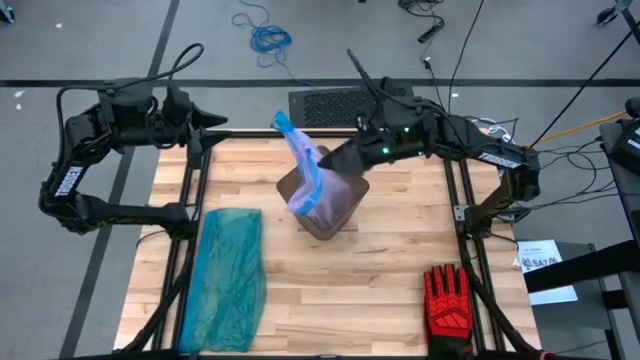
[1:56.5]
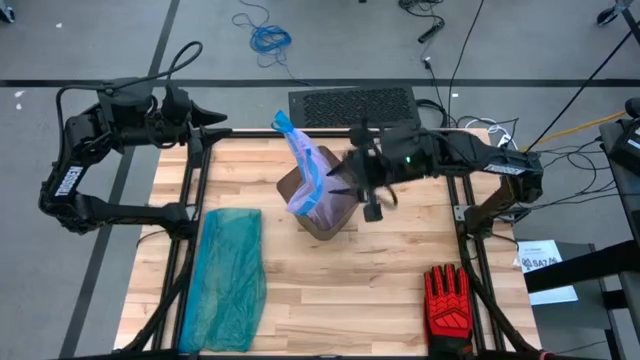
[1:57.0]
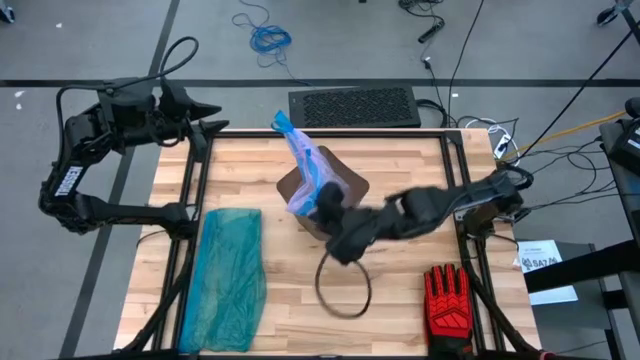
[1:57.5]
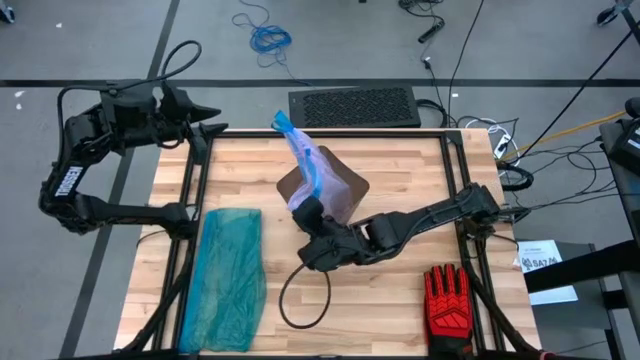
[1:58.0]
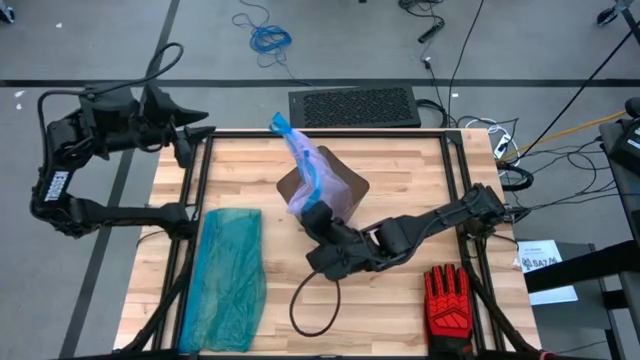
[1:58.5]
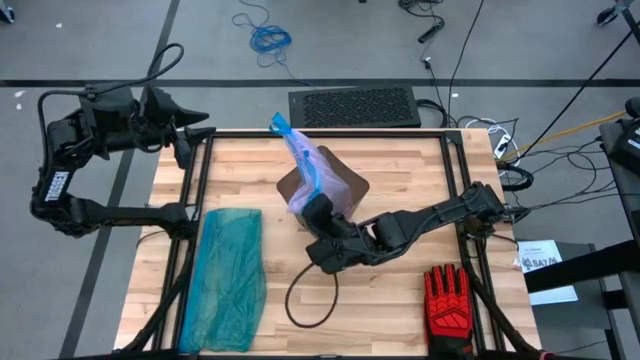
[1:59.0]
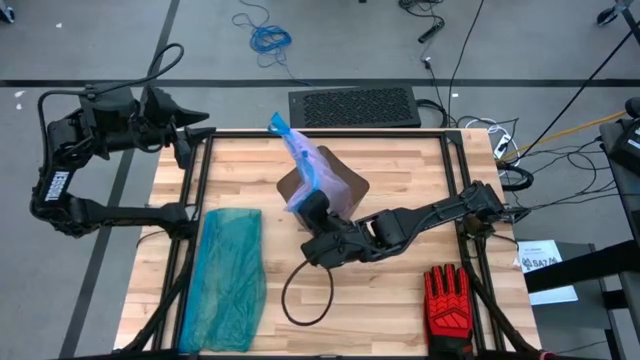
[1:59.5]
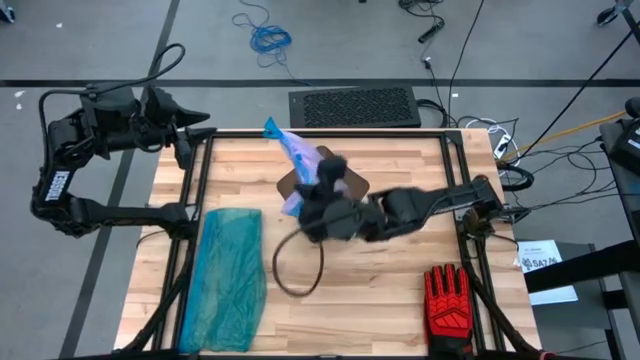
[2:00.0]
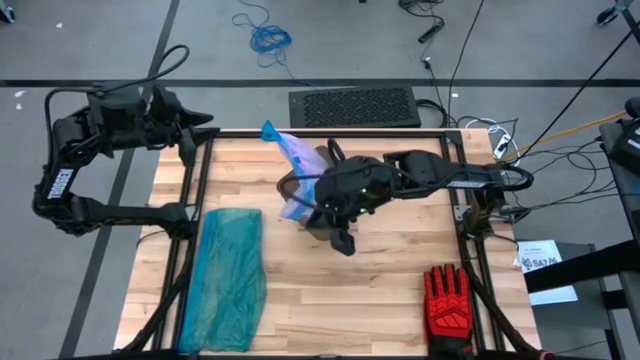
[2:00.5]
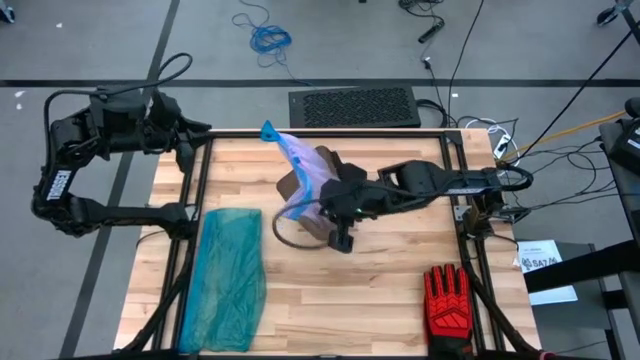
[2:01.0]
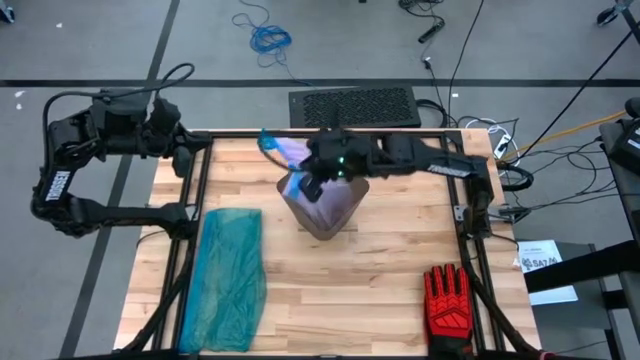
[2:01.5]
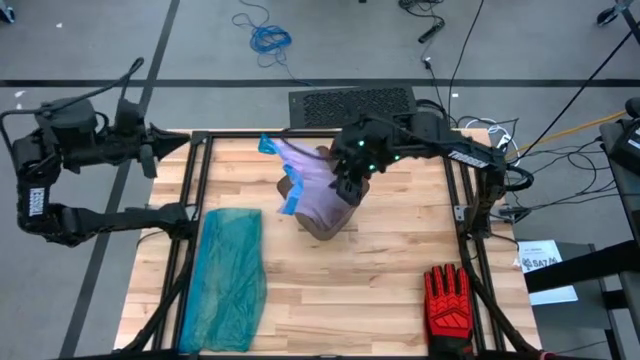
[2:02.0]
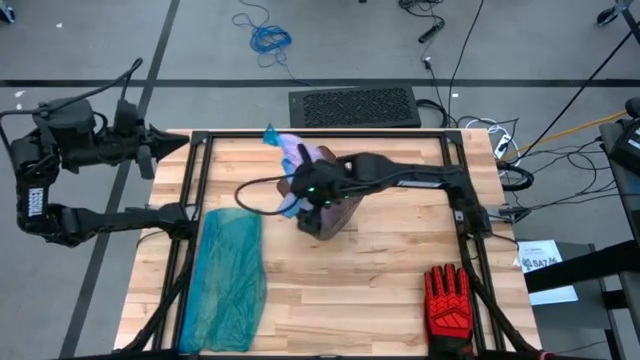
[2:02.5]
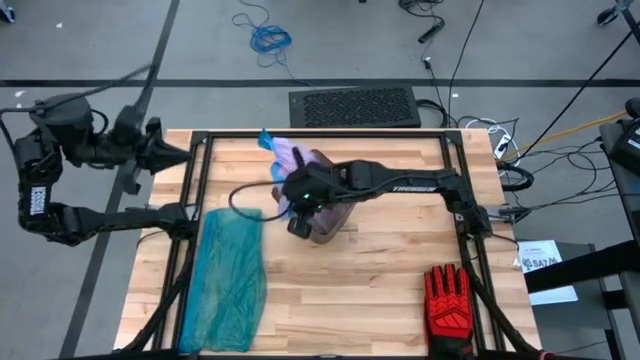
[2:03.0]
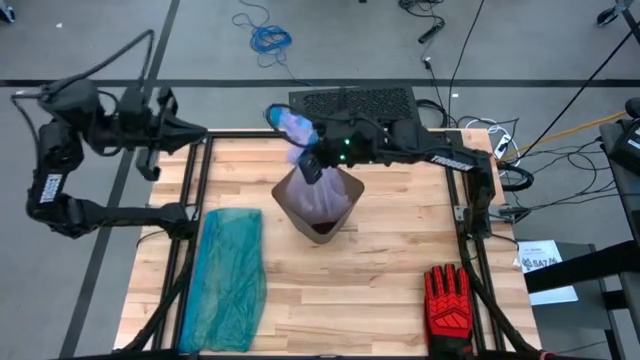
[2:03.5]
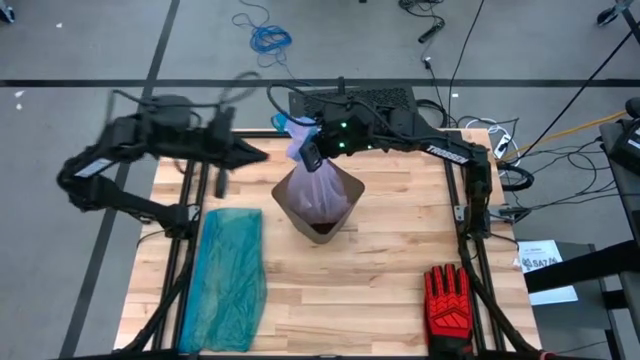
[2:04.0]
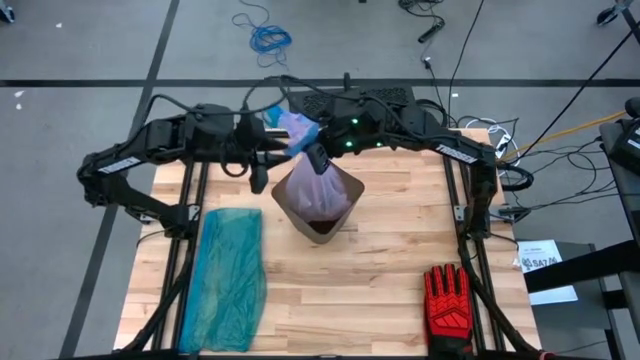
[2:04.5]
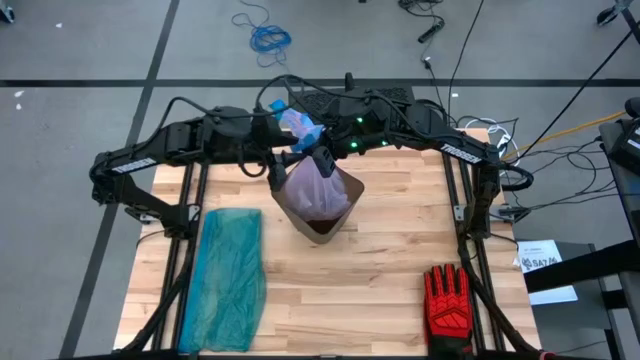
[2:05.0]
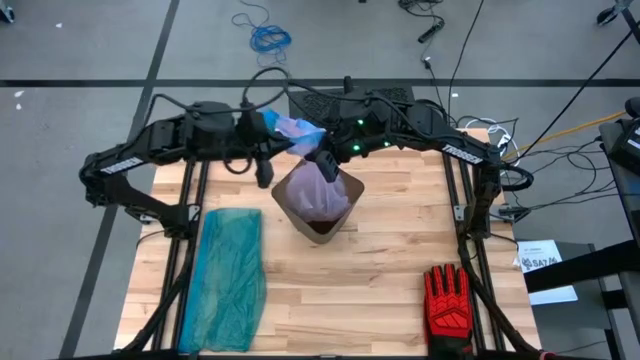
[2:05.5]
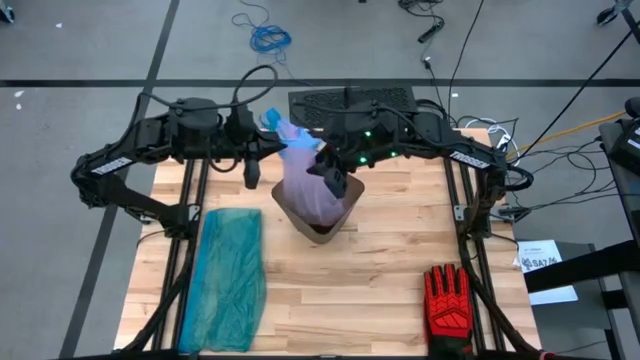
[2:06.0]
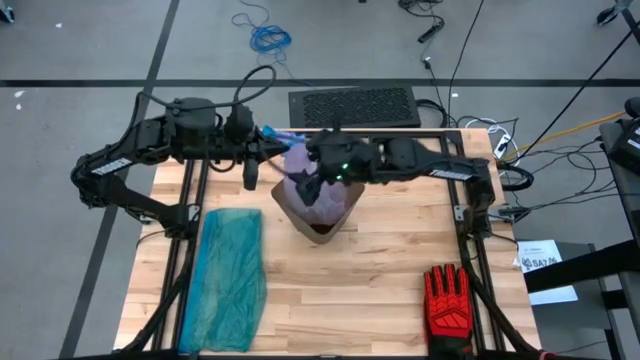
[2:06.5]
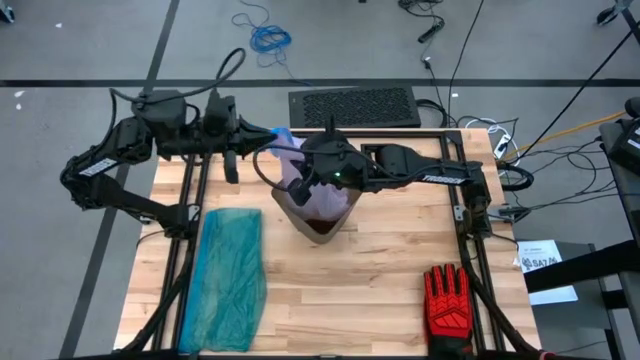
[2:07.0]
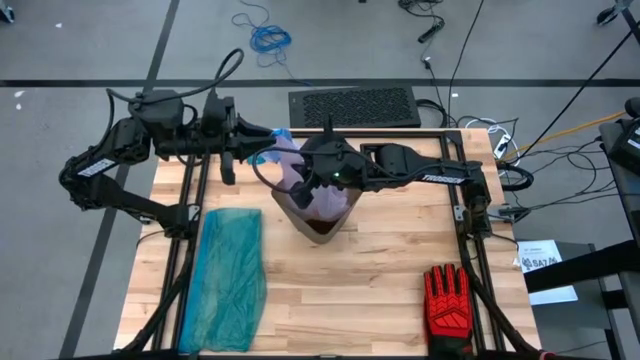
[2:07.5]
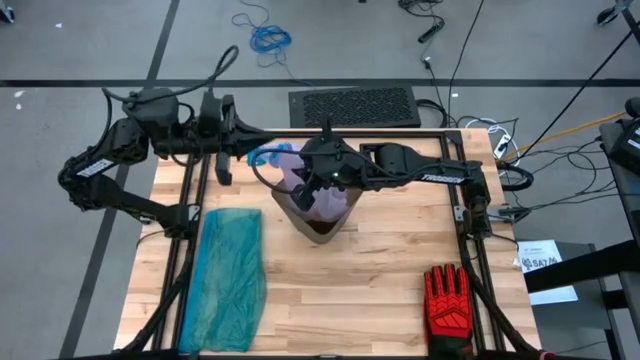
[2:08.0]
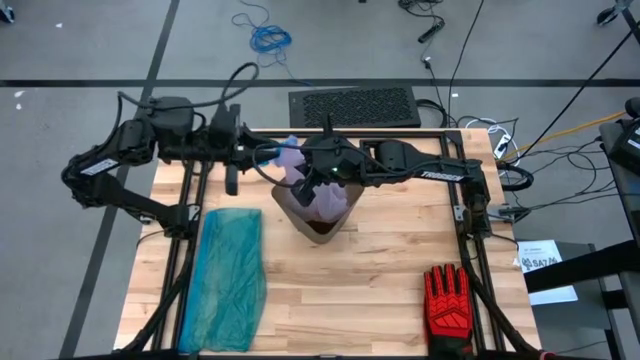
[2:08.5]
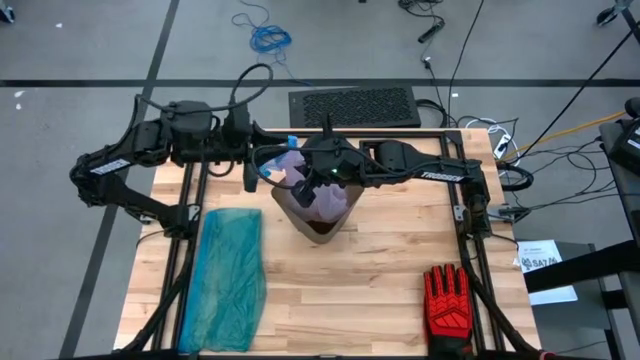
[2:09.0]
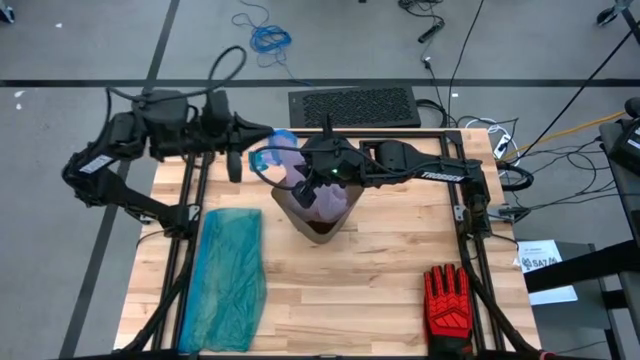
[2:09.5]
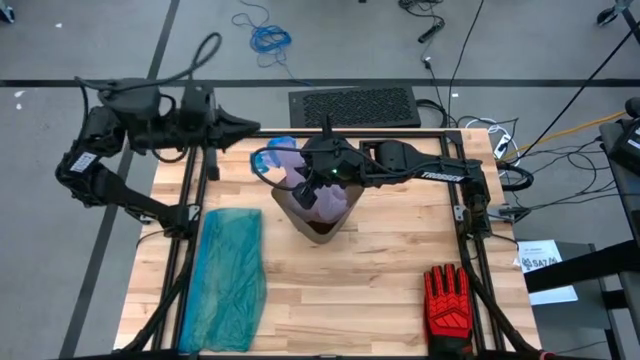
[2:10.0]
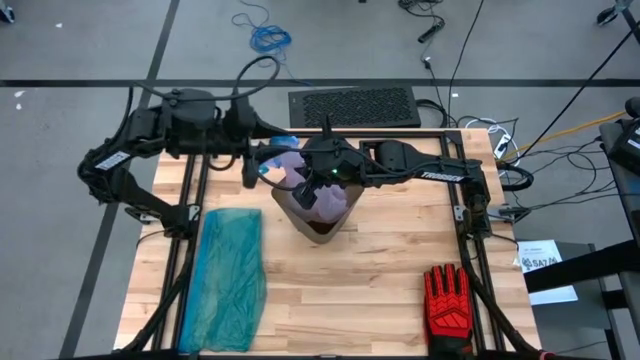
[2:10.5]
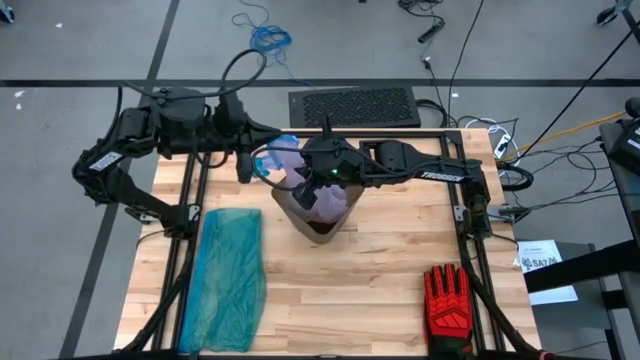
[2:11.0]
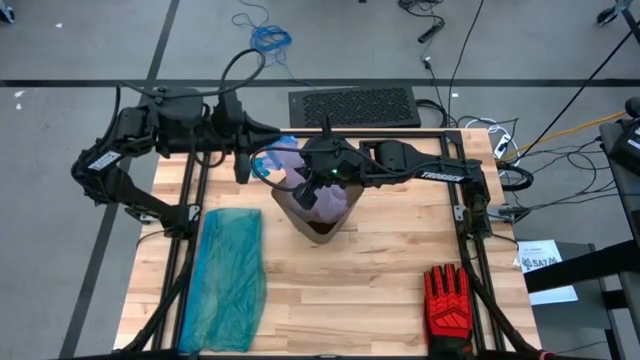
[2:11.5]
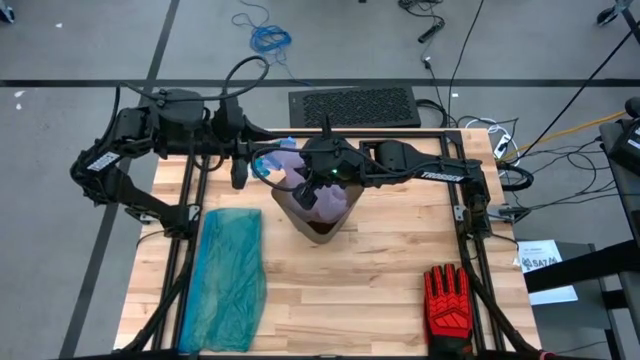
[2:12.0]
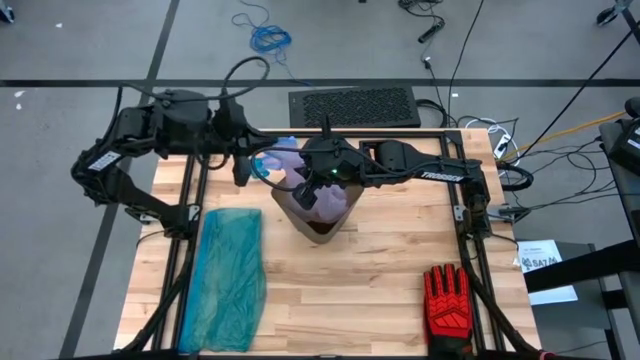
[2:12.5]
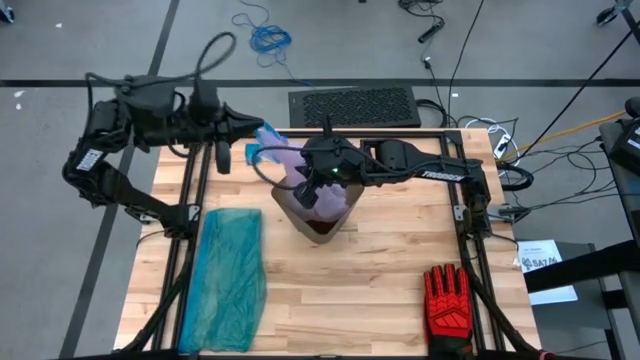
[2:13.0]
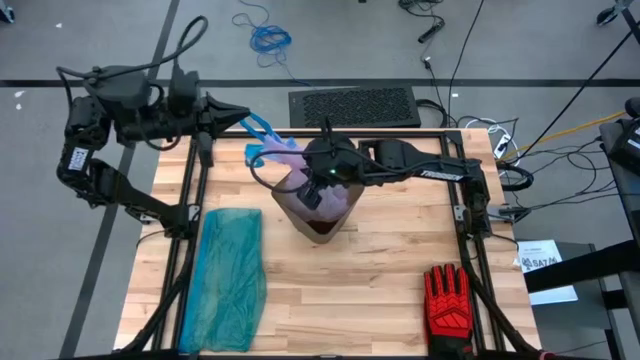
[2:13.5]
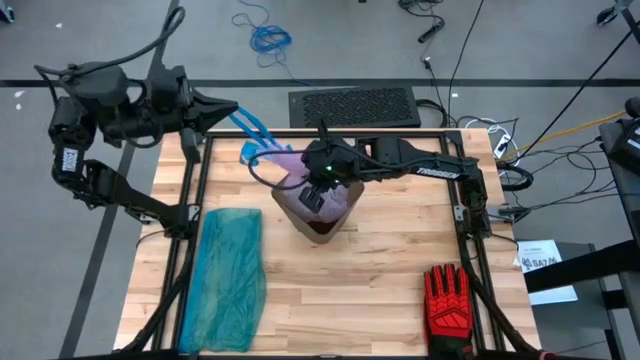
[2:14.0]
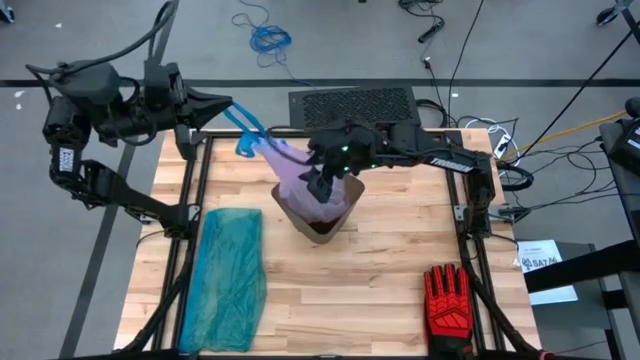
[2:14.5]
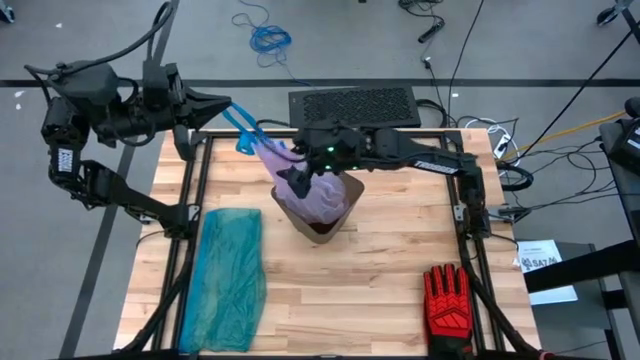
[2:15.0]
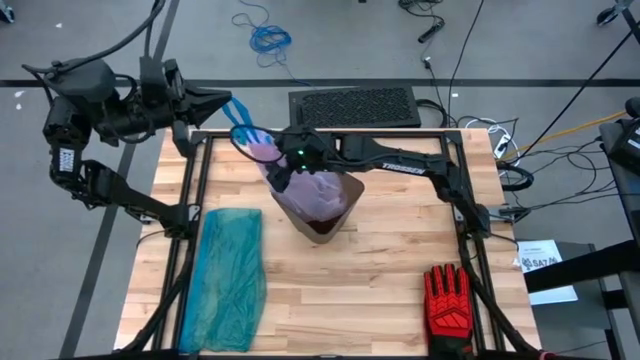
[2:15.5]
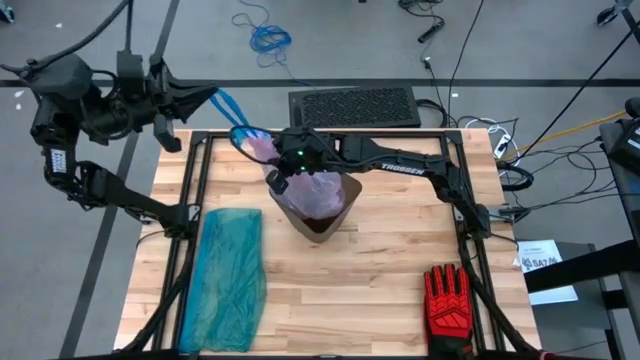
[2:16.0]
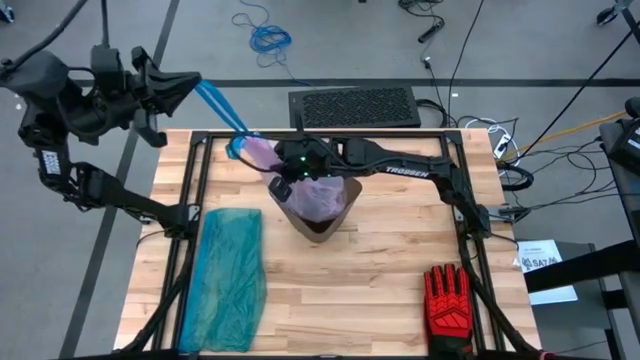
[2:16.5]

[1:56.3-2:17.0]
Task: place trash/remove bag and relplace
Close the trash bag
